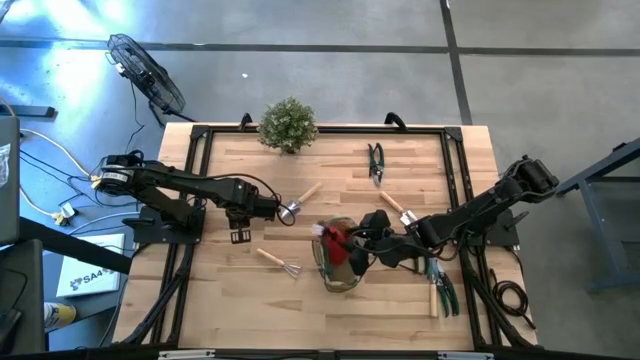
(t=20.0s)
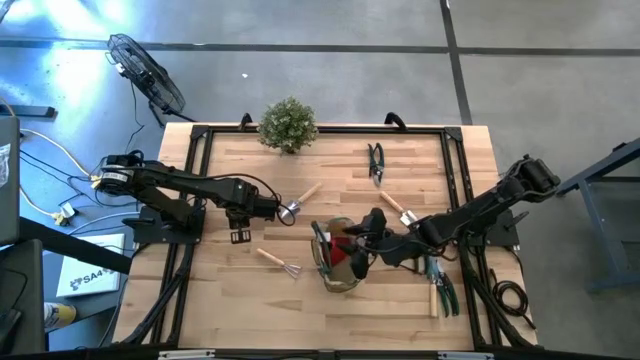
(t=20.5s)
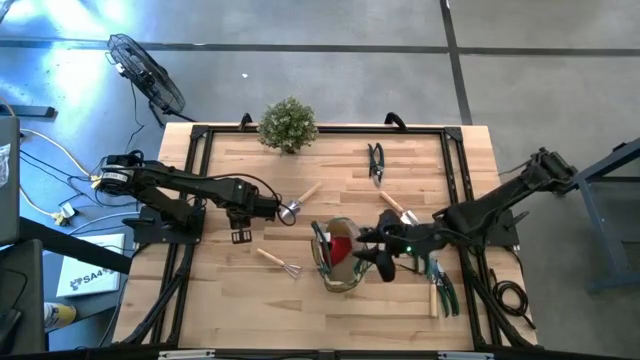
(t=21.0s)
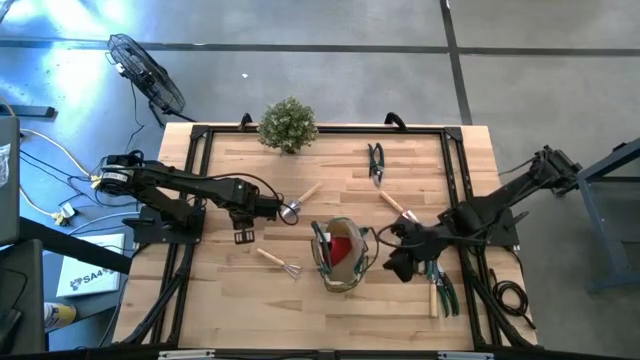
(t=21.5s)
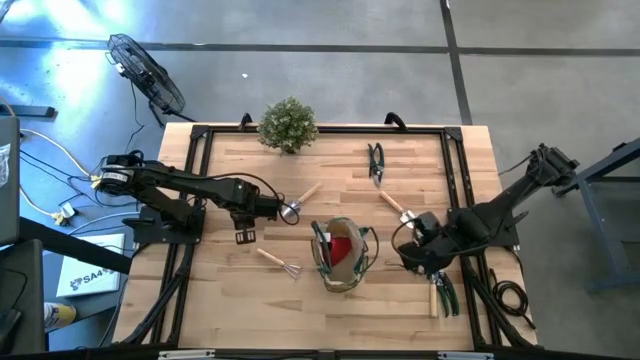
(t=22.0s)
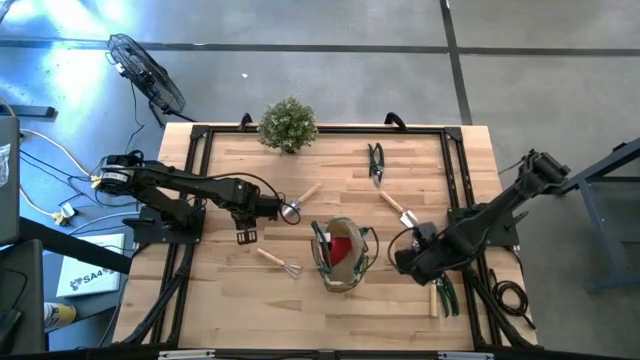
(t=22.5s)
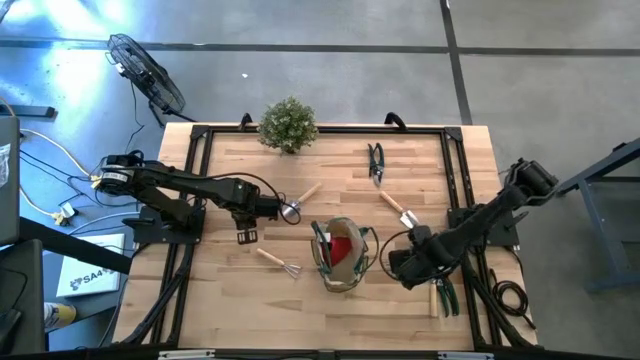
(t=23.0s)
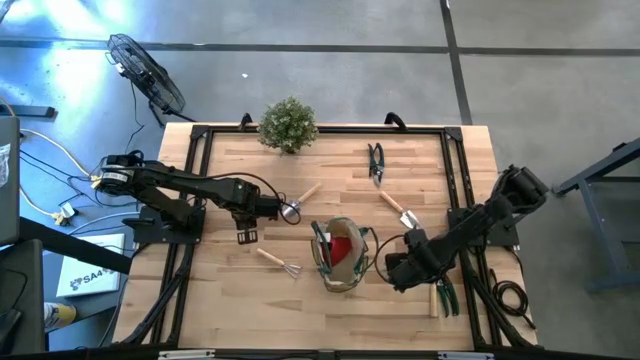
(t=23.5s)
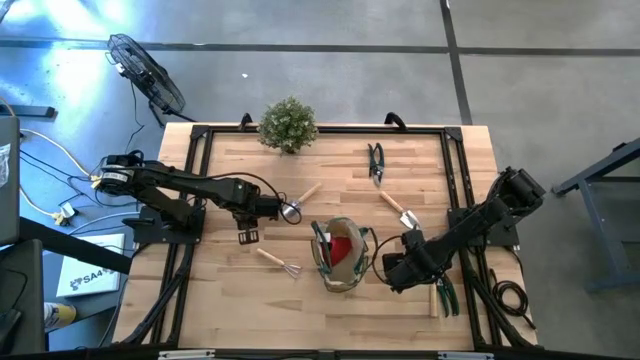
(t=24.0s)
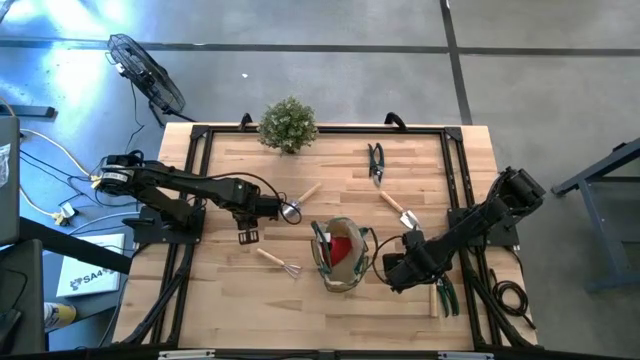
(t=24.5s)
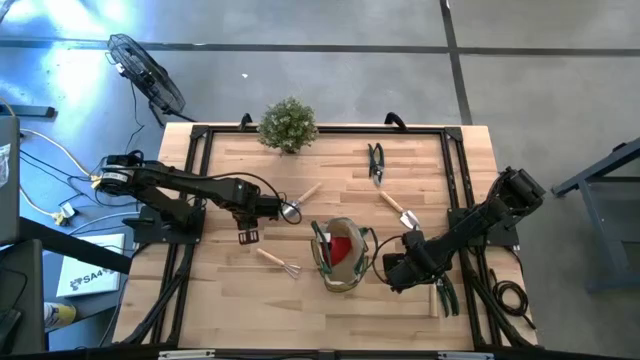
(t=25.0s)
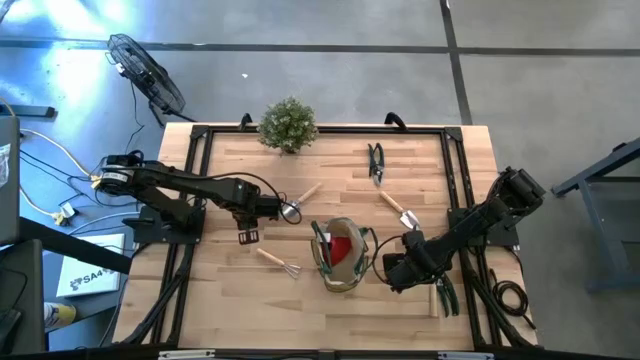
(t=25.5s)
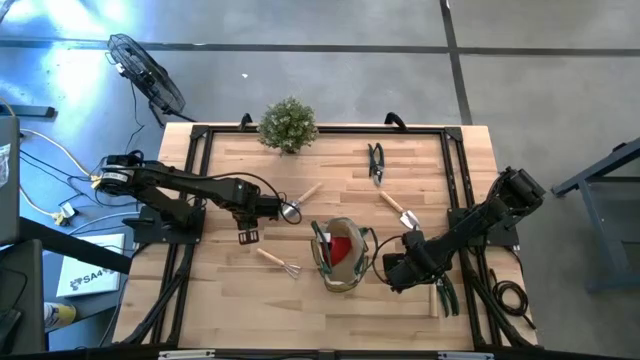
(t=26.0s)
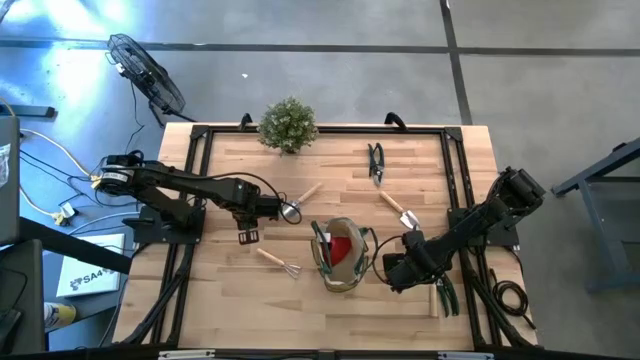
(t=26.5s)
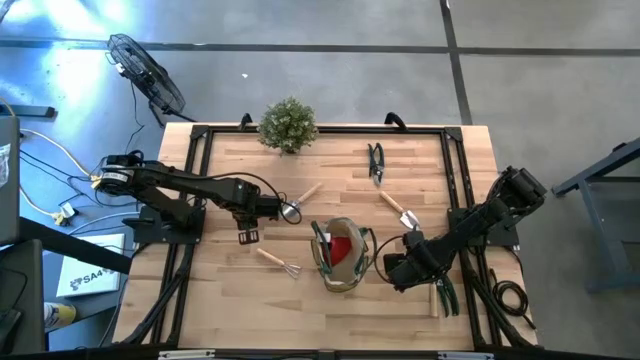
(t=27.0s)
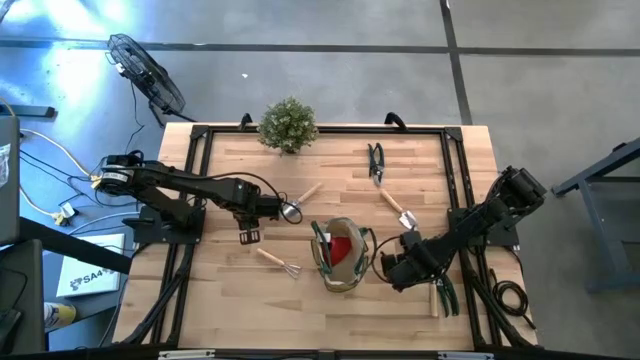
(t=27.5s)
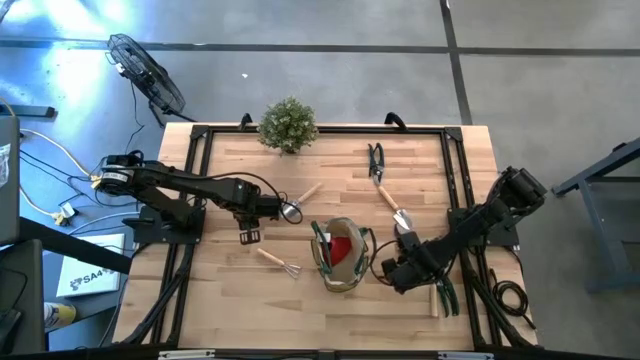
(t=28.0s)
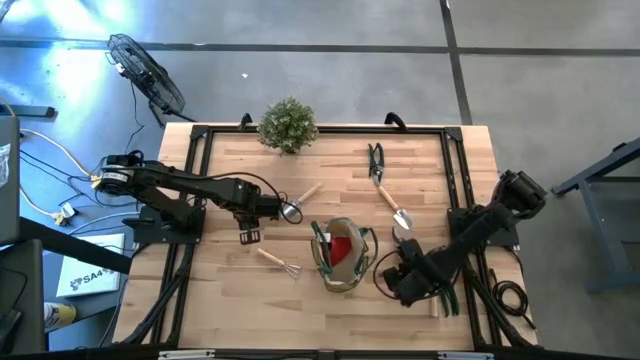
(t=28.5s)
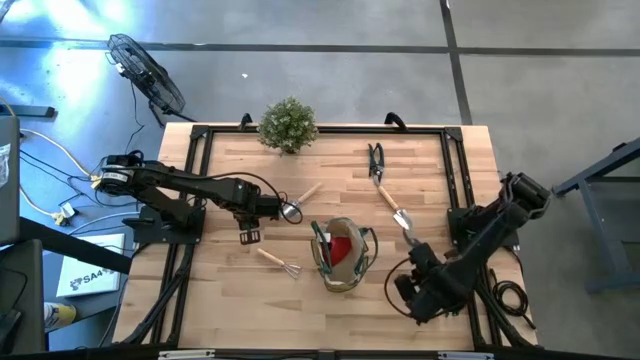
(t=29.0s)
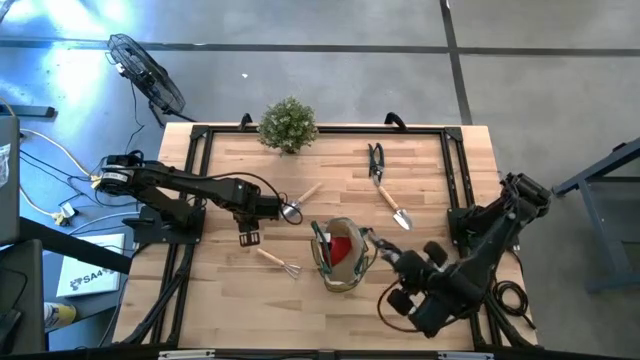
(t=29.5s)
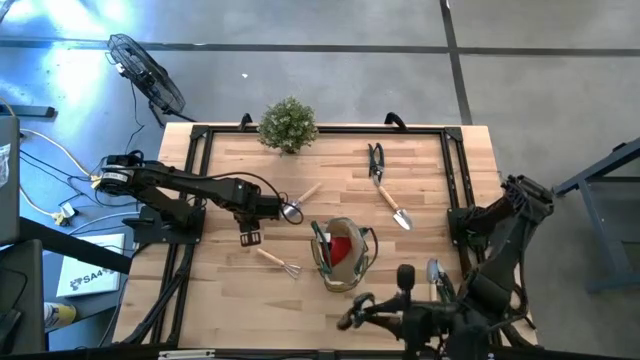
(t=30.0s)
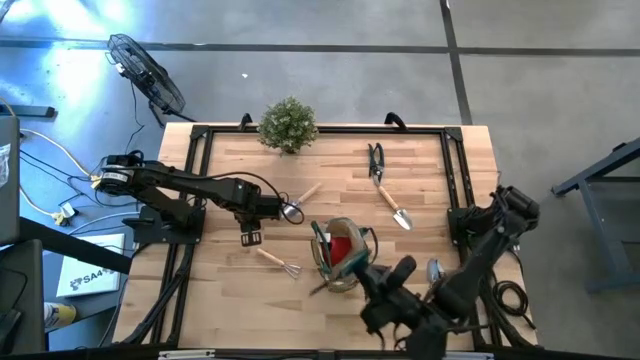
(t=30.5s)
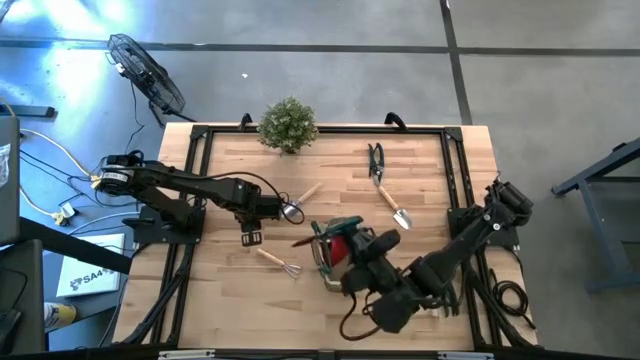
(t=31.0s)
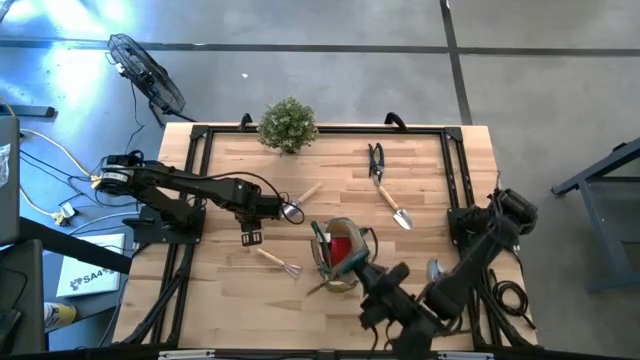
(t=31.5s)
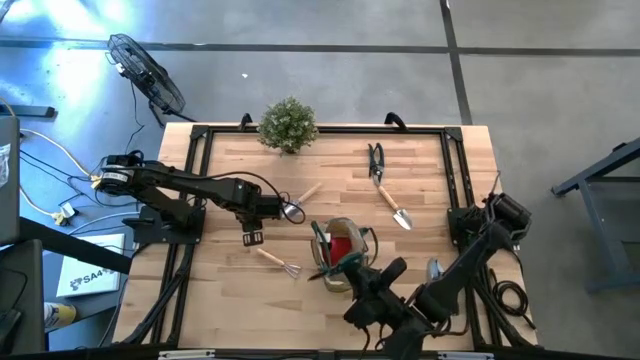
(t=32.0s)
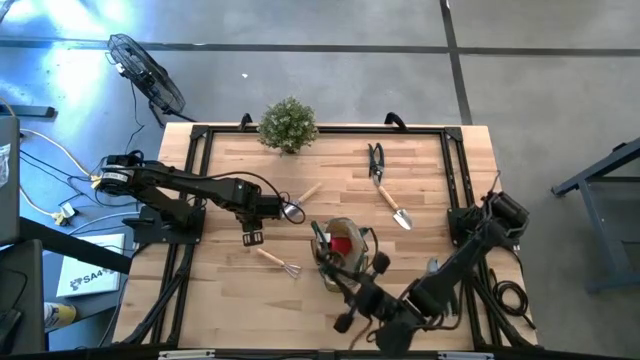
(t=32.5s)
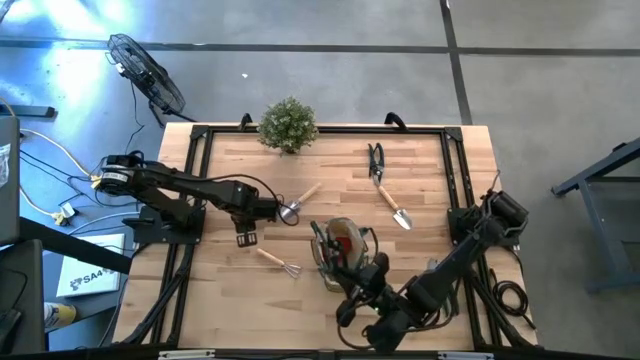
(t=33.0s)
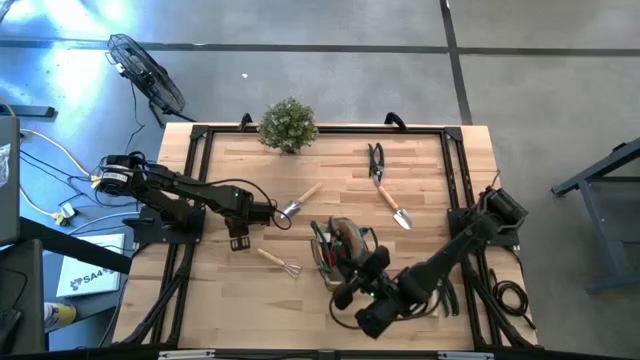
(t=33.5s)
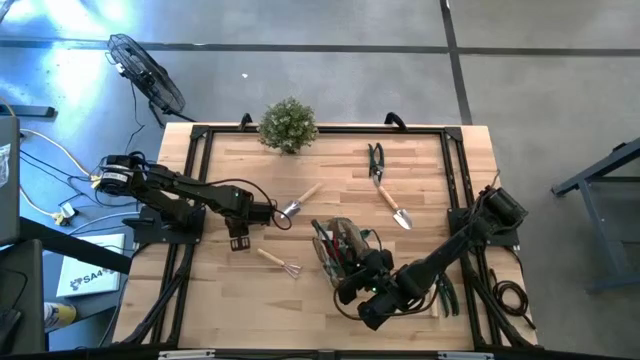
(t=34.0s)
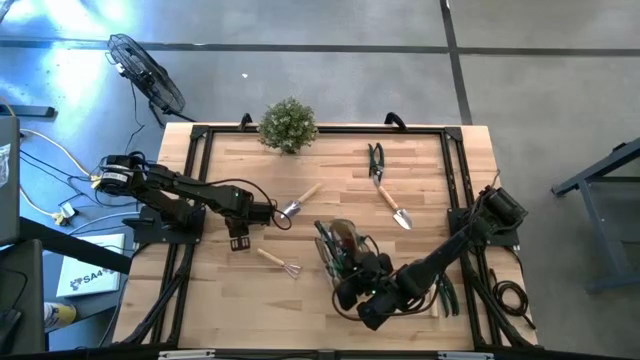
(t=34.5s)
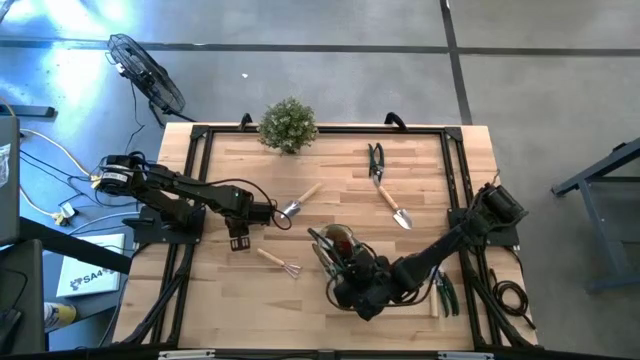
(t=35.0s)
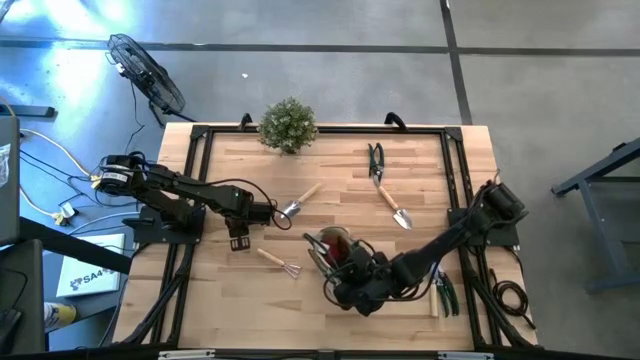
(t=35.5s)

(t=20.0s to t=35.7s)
Task: Pick & Place Garden tools in Gardening bag
Put the middle green scissors into the green bag

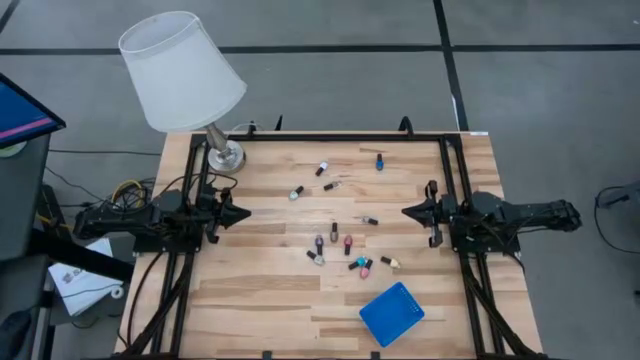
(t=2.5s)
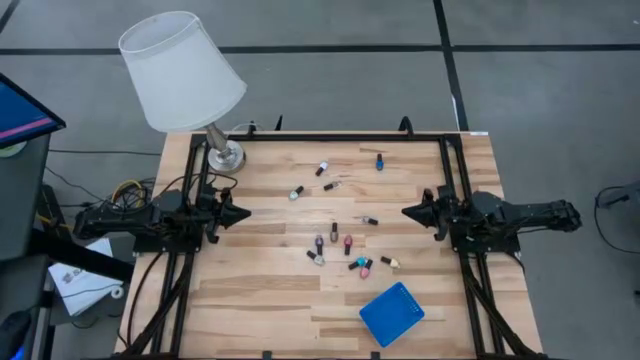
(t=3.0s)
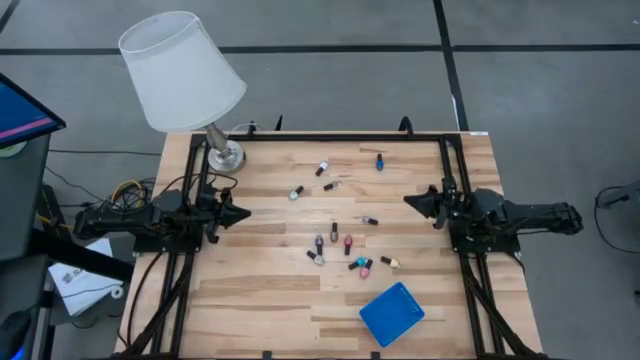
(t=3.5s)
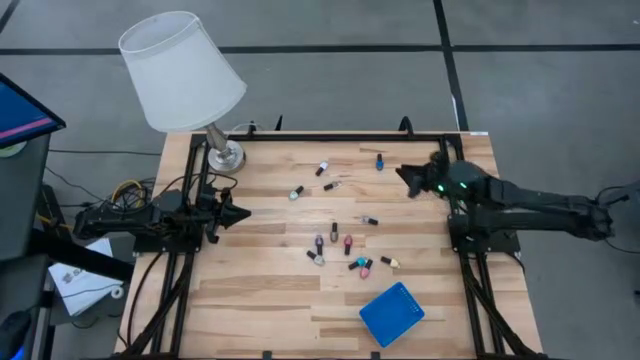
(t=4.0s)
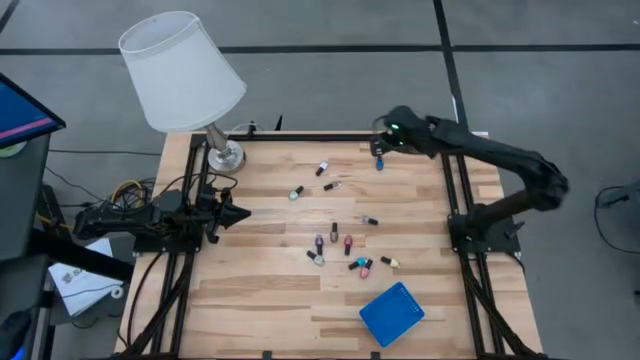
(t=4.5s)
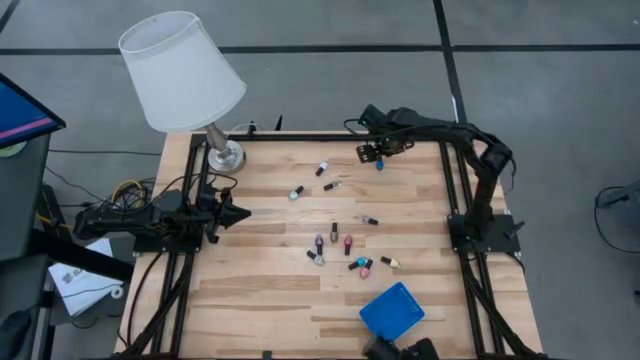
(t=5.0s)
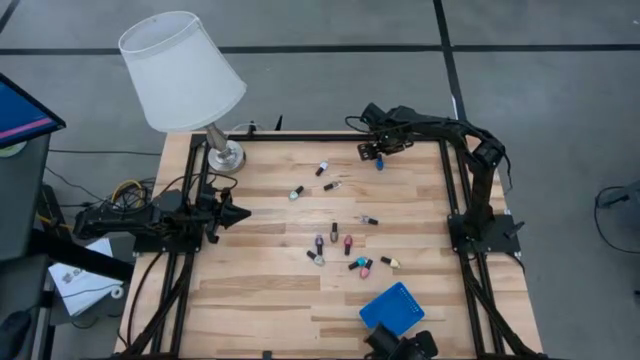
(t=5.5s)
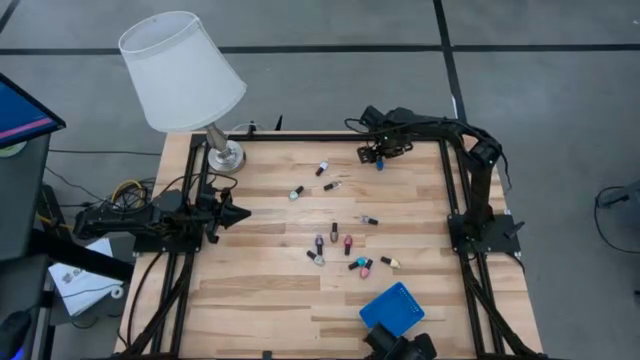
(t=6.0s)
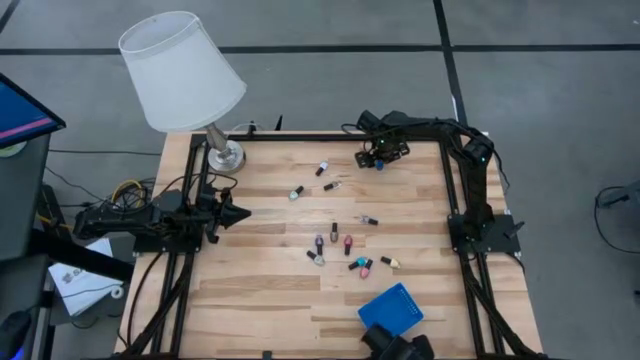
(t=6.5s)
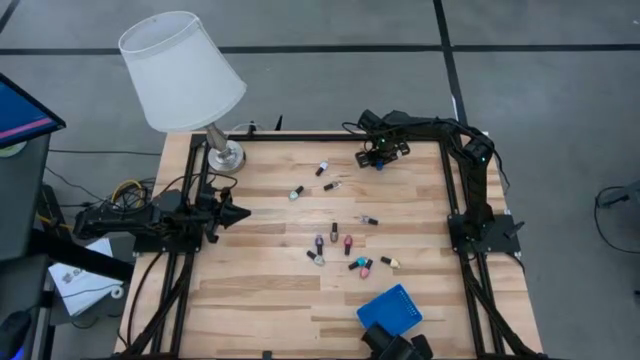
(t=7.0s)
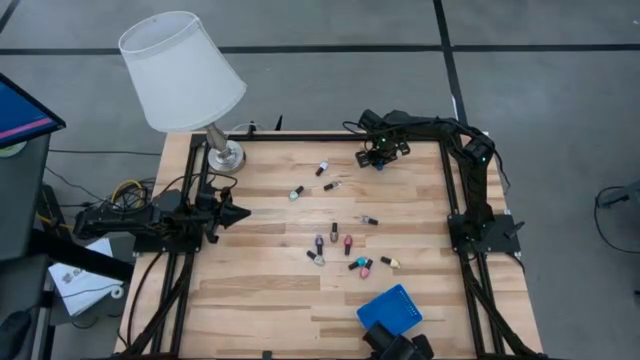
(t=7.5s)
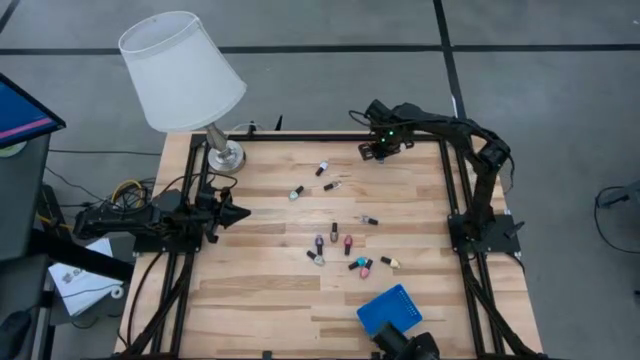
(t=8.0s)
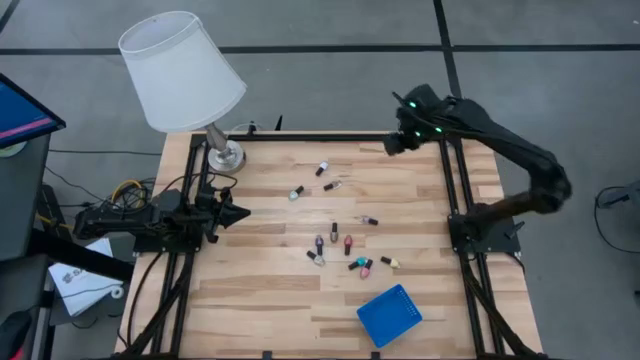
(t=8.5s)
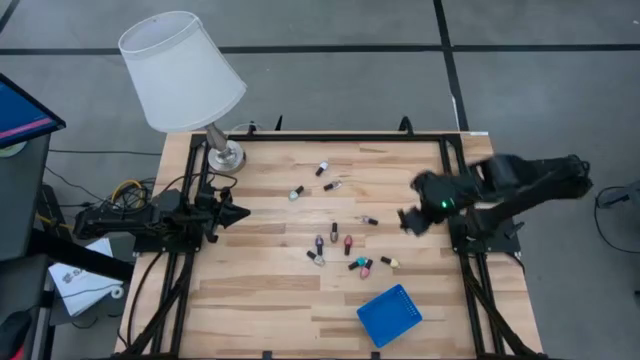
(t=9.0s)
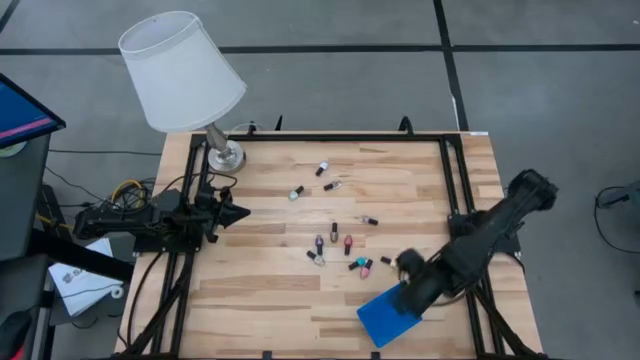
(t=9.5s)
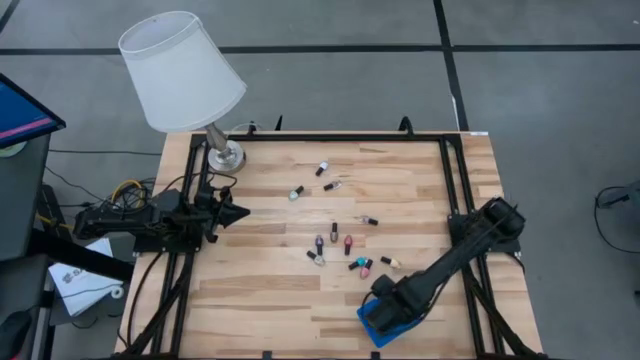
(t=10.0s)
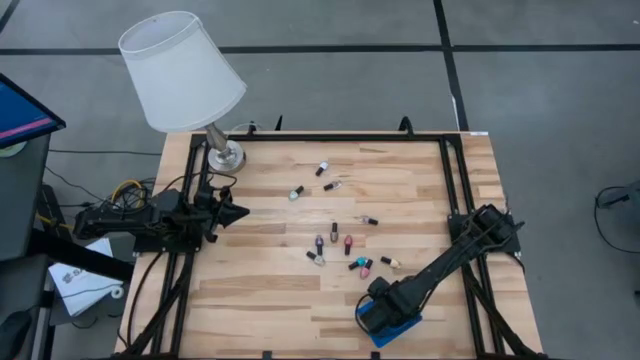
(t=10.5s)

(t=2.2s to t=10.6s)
Task: Pick & Place Nail Polish
Put the blue nail polish into the blue bin
